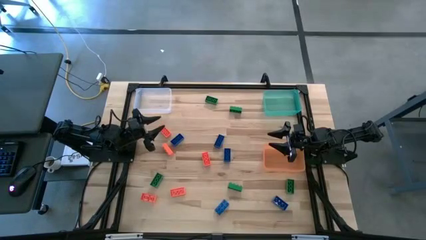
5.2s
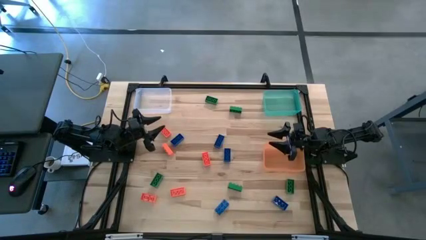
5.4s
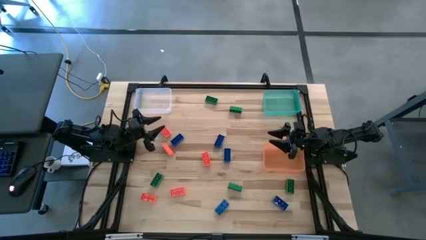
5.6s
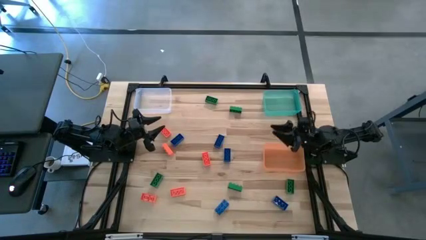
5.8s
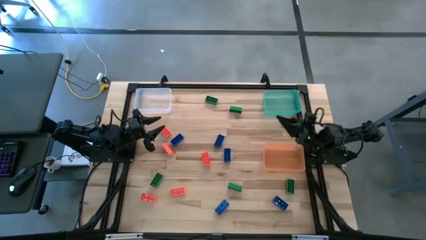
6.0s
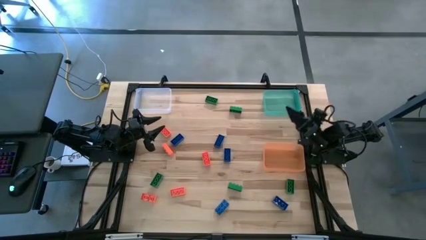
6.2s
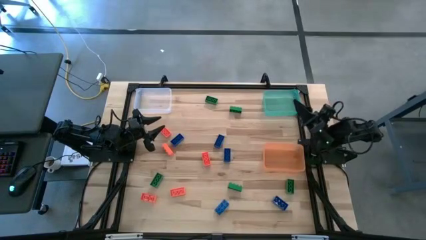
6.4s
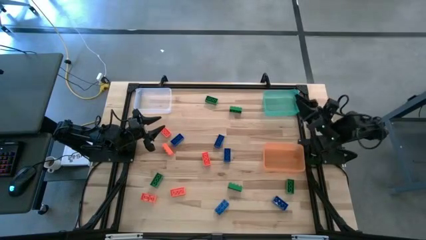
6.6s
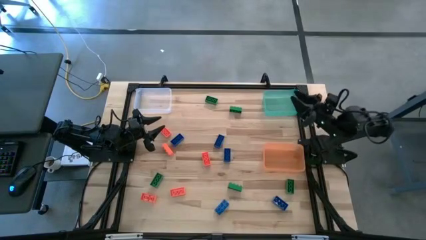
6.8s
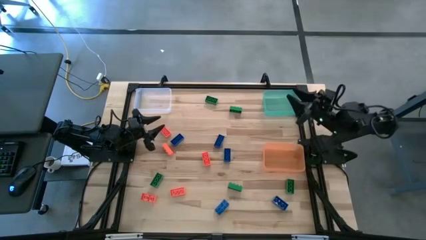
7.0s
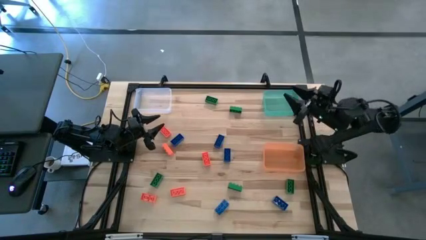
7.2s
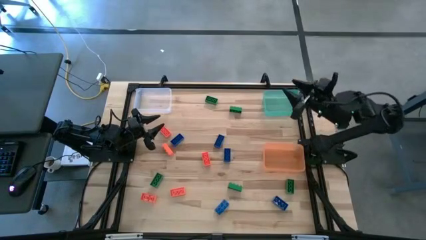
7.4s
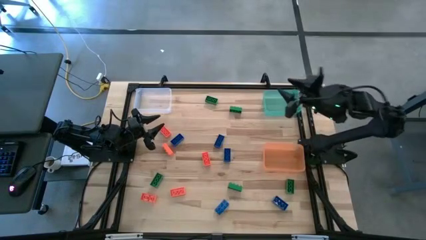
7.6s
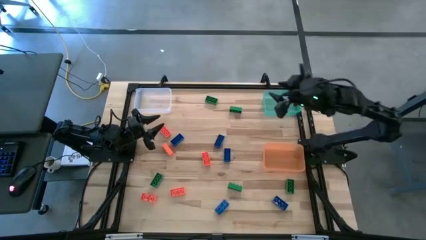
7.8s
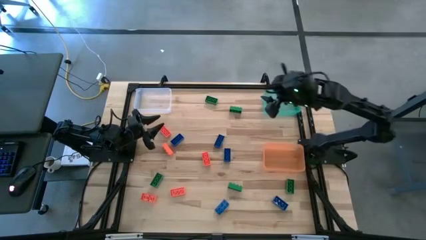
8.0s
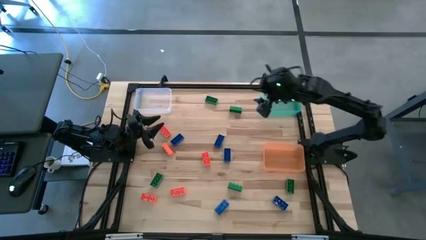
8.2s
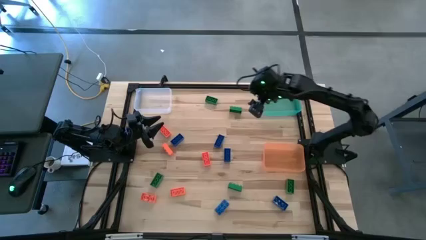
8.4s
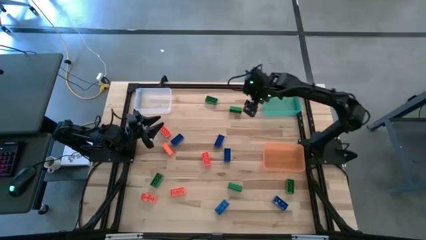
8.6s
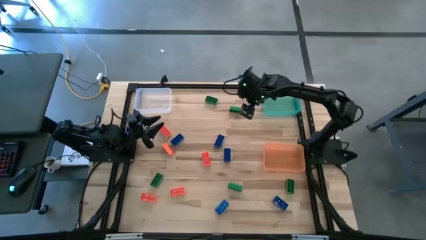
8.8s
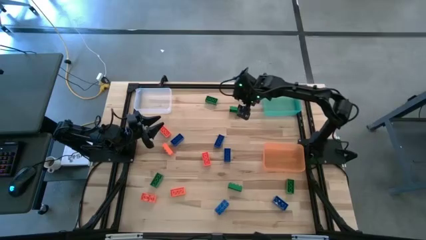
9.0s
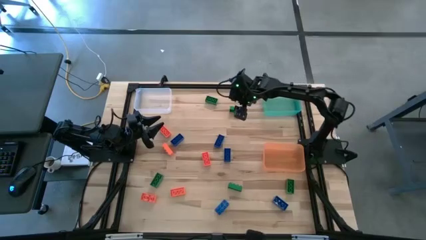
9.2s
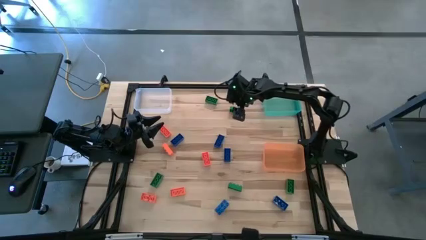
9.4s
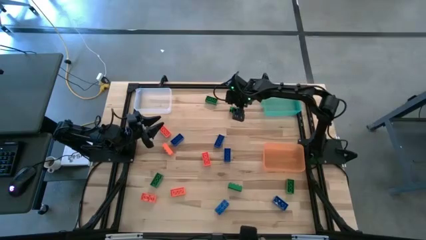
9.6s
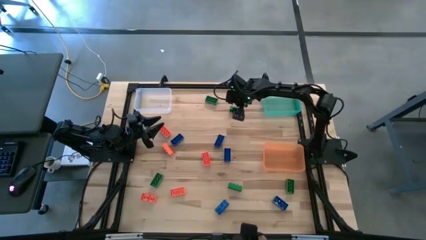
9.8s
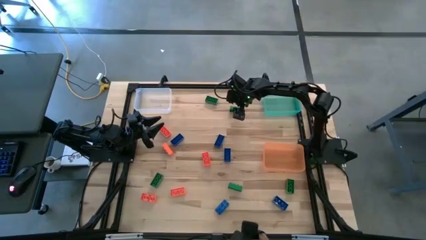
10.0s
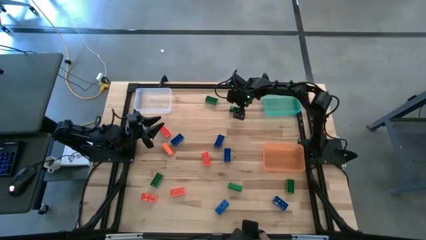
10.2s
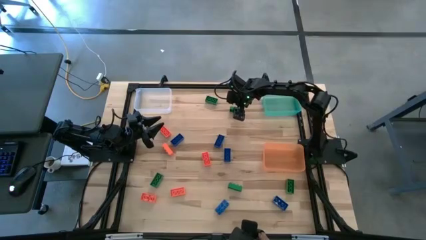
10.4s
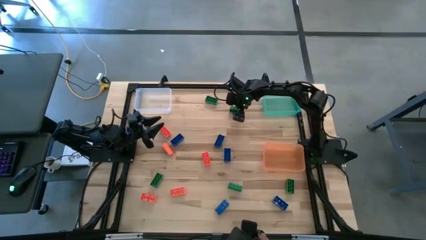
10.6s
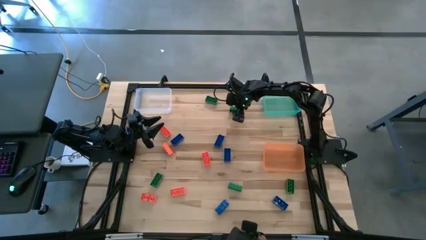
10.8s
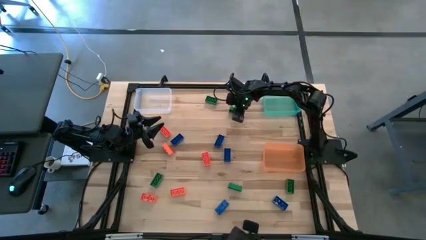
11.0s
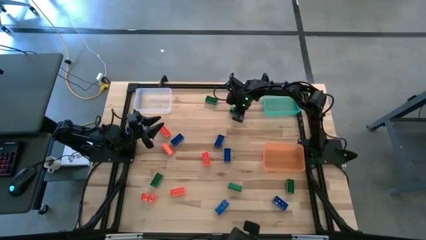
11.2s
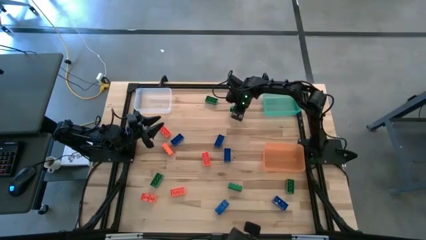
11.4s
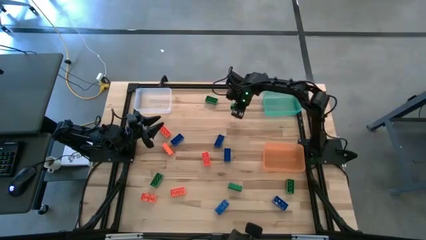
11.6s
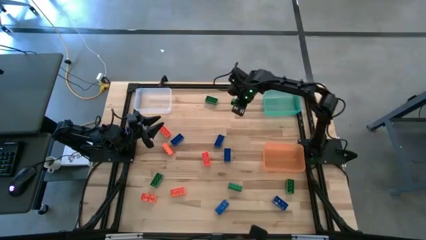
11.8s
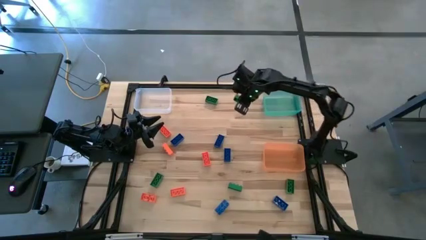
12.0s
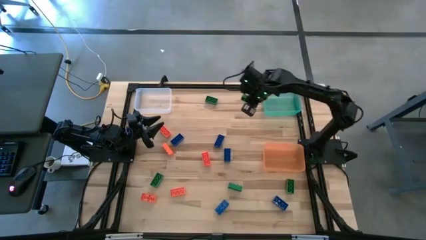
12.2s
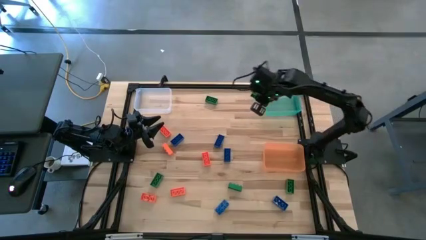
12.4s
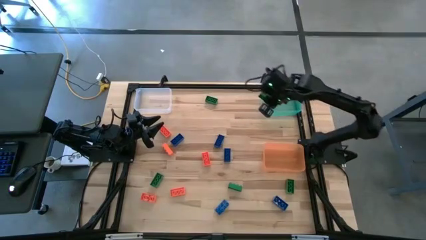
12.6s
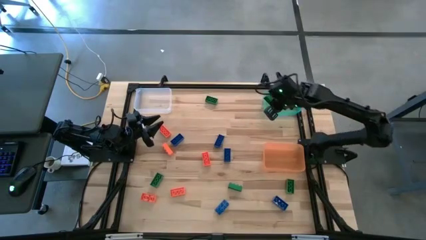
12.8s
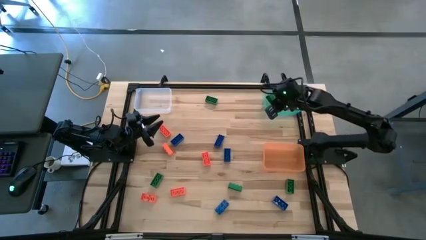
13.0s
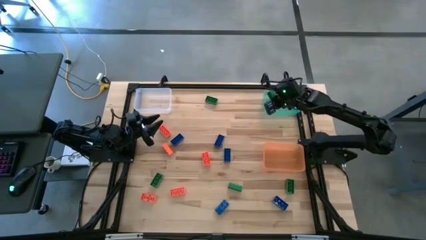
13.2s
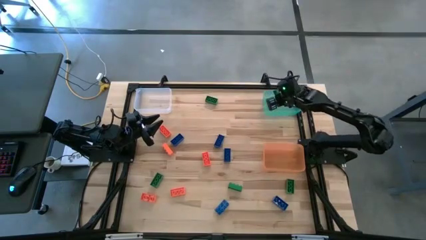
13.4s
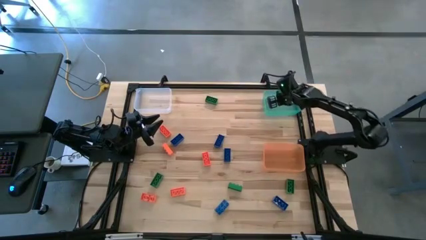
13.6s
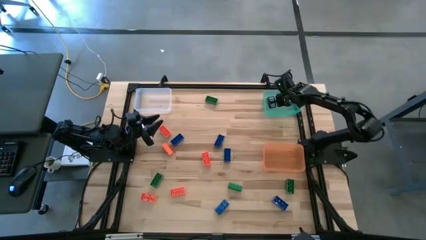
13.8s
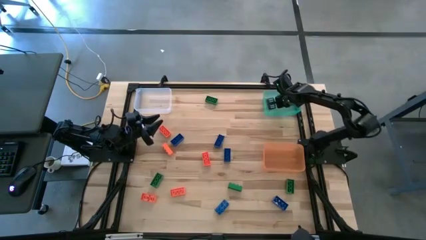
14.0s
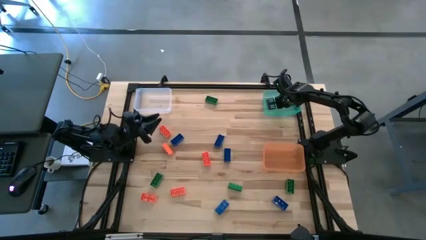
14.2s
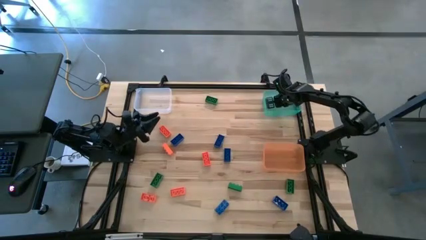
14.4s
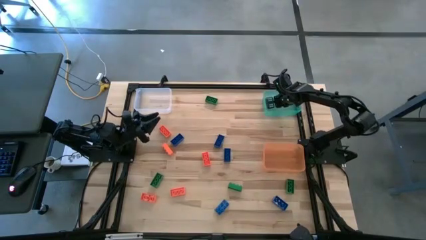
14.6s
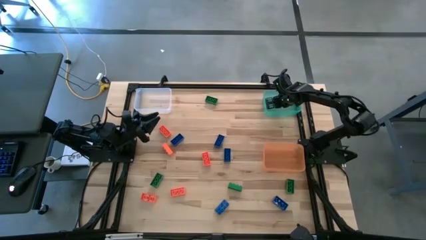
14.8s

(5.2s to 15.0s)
Task: Sort & place blocks by color
Put the green game piece into the green bin

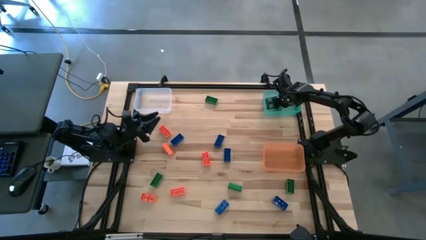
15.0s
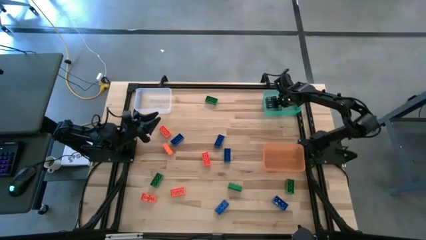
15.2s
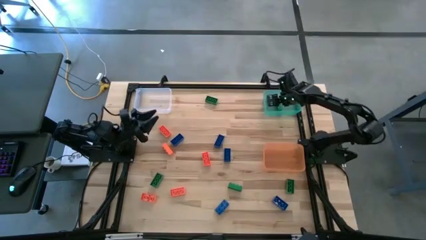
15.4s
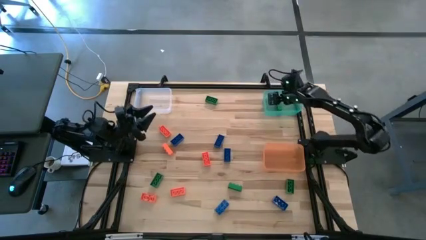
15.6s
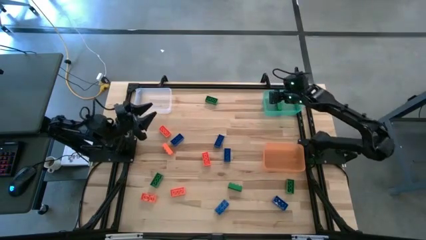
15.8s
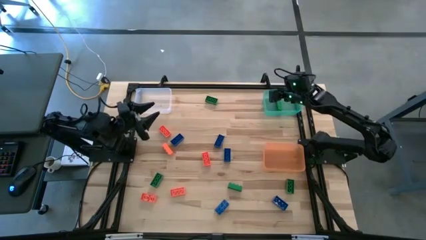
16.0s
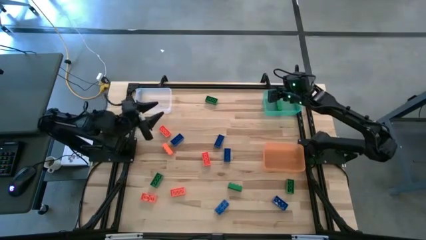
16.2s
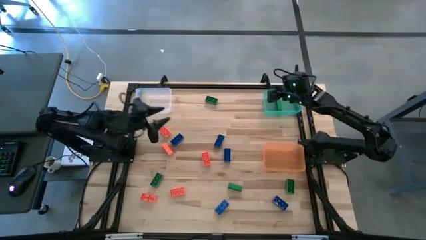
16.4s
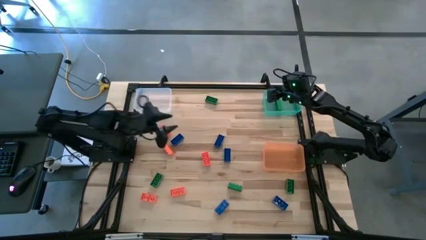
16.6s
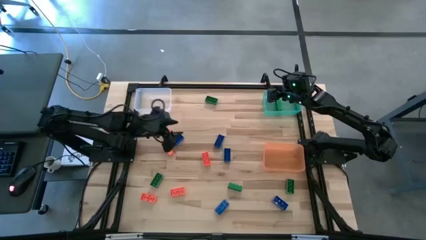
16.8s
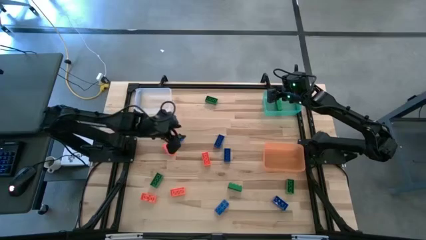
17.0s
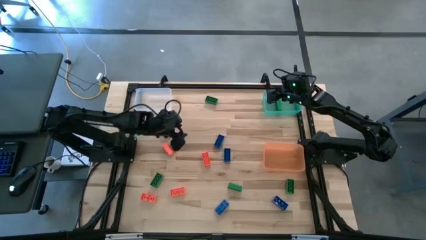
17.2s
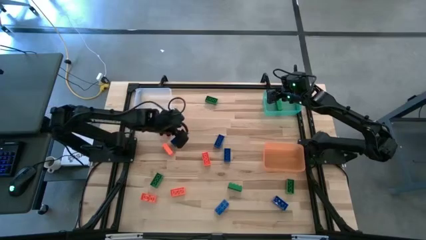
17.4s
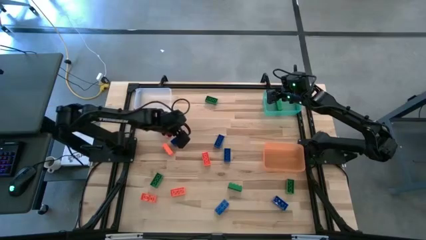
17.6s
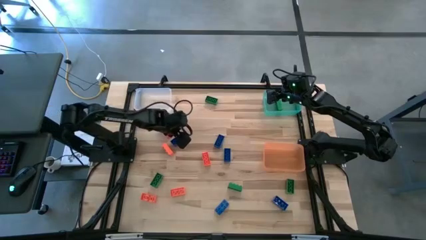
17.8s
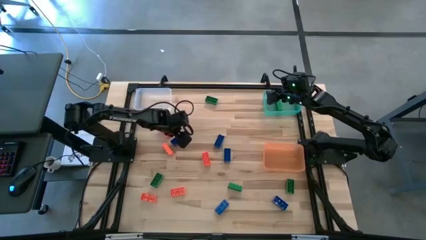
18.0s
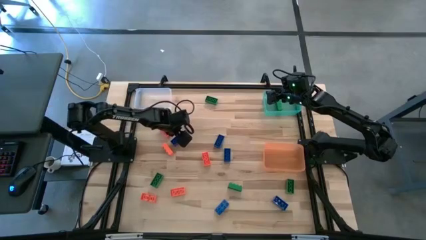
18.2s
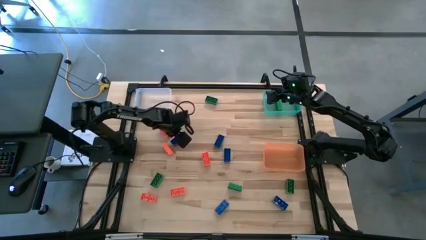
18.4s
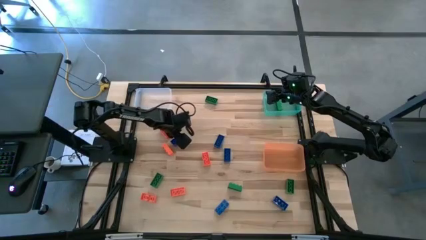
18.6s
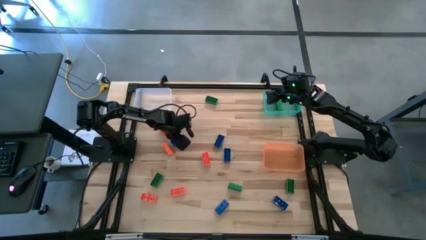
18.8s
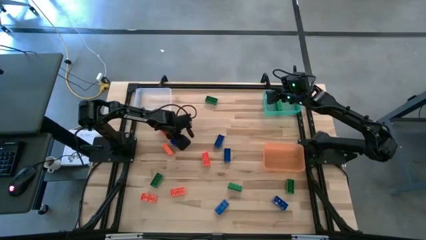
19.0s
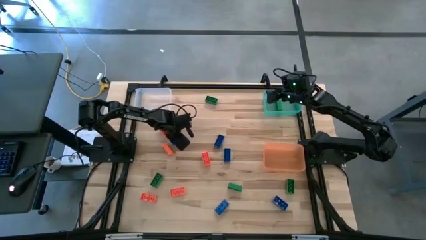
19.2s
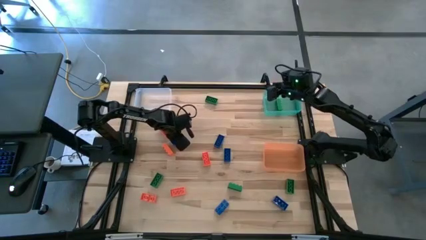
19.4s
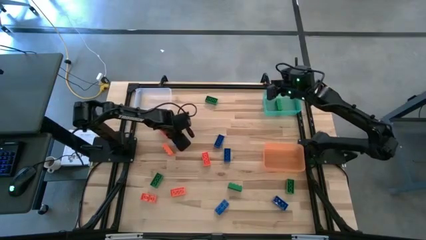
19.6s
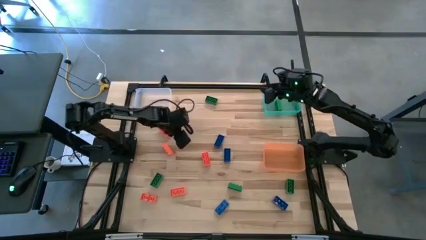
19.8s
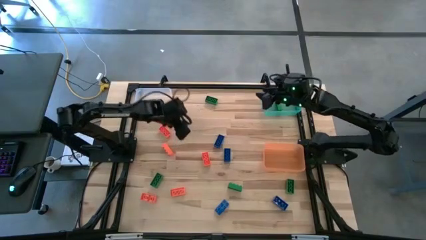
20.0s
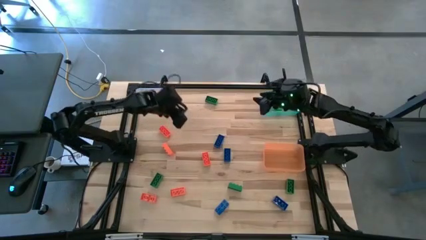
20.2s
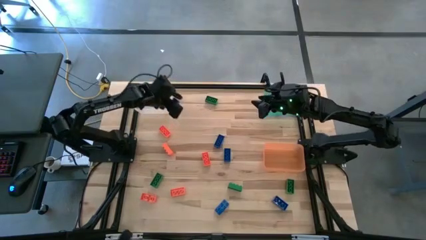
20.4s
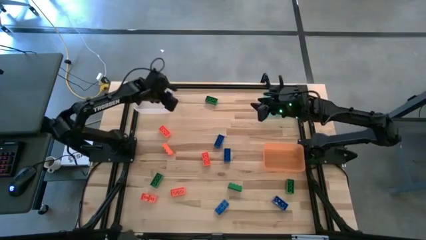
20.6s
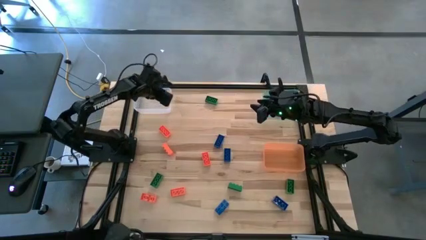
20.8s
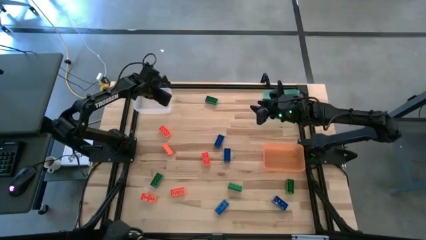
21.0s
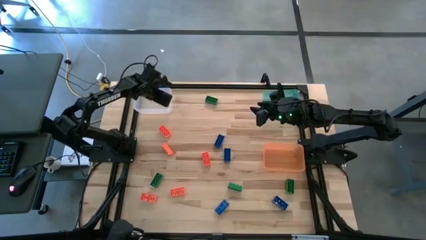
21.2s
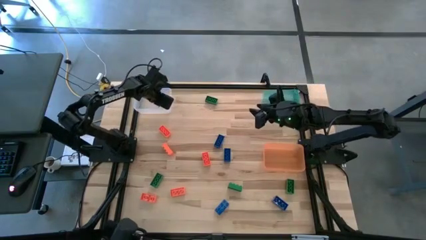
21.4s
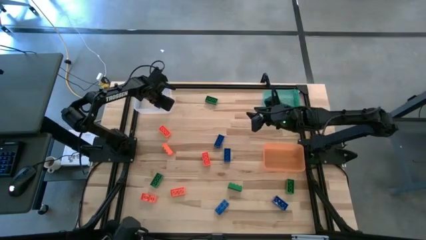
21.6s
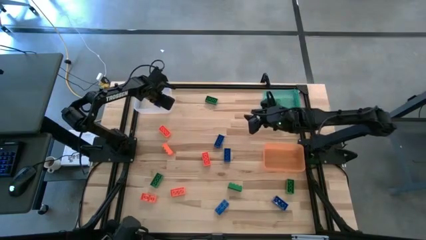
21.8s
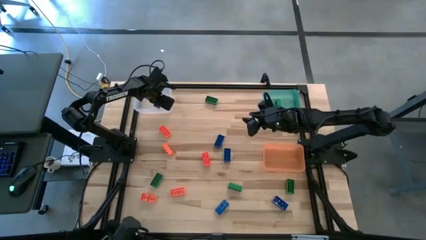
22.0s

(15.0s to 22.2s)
Put the blue game piece into the transparent bin
